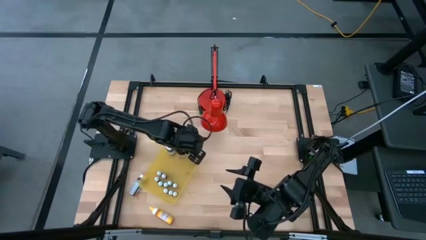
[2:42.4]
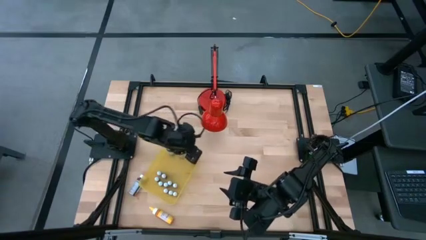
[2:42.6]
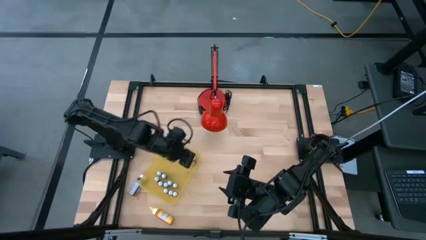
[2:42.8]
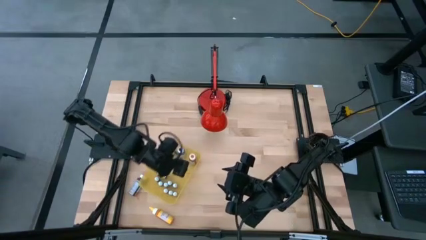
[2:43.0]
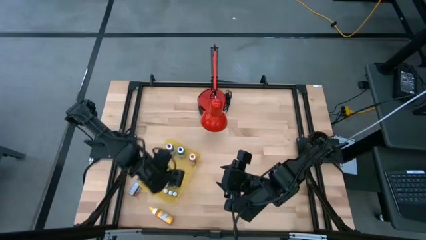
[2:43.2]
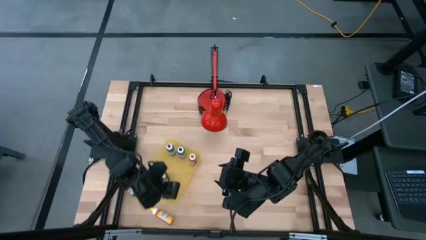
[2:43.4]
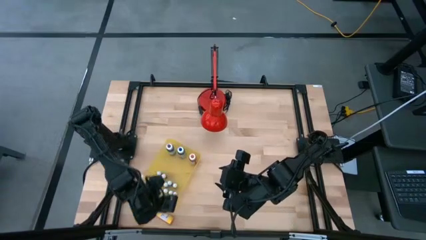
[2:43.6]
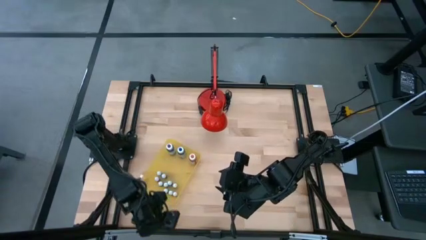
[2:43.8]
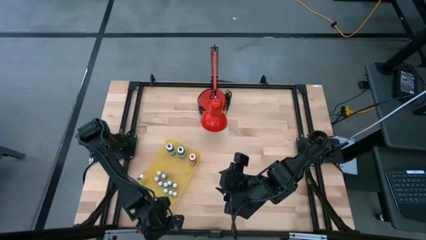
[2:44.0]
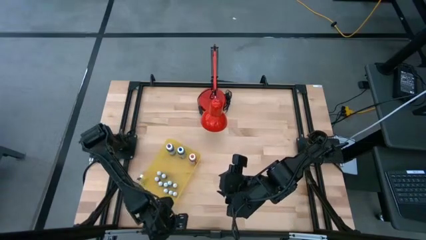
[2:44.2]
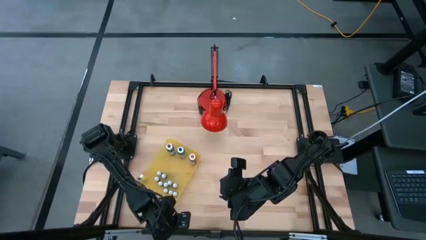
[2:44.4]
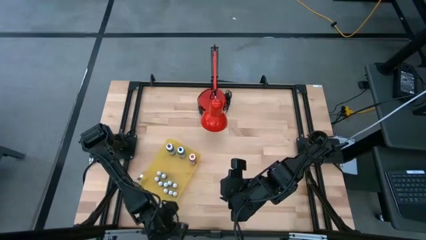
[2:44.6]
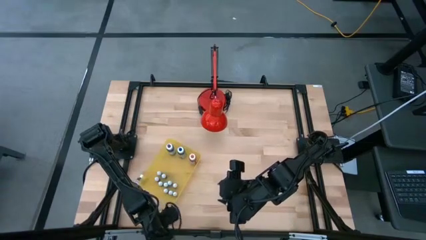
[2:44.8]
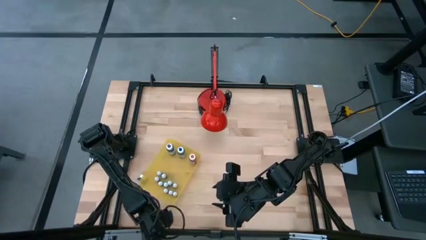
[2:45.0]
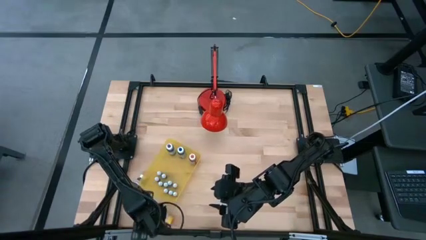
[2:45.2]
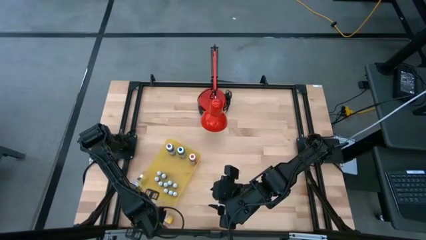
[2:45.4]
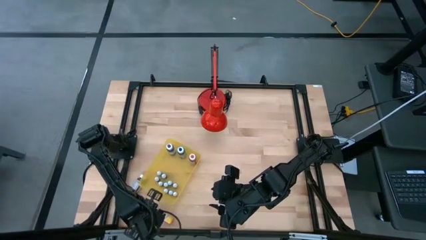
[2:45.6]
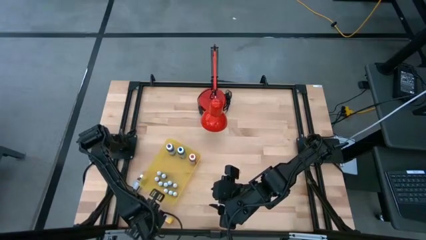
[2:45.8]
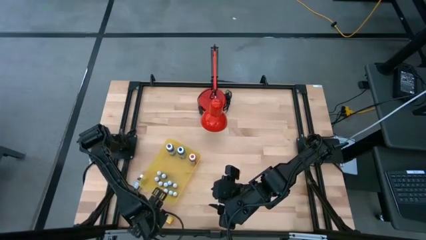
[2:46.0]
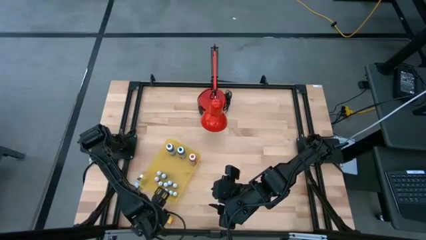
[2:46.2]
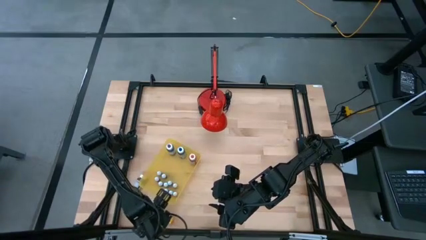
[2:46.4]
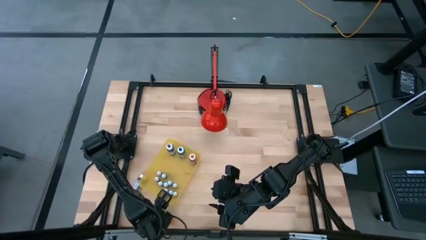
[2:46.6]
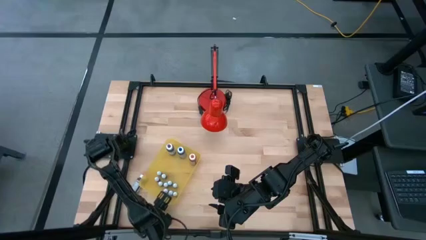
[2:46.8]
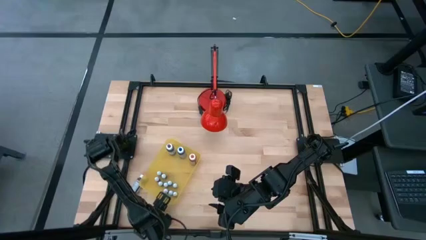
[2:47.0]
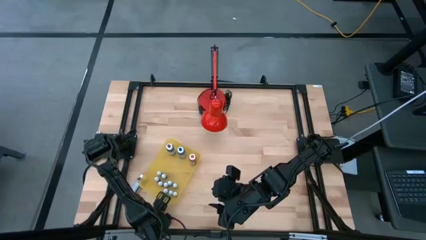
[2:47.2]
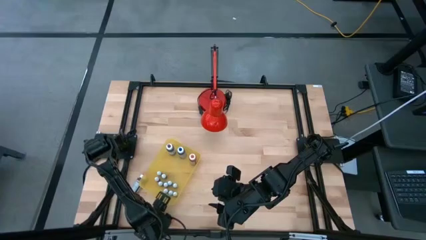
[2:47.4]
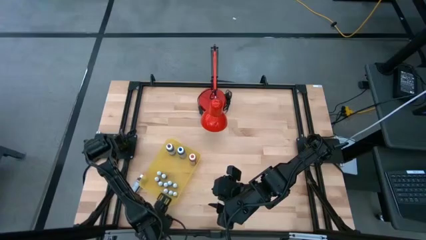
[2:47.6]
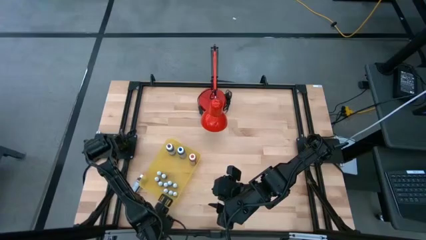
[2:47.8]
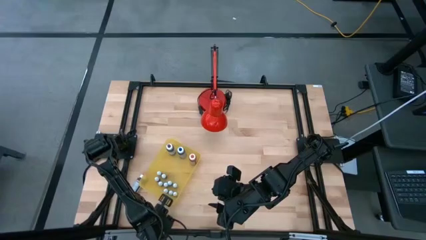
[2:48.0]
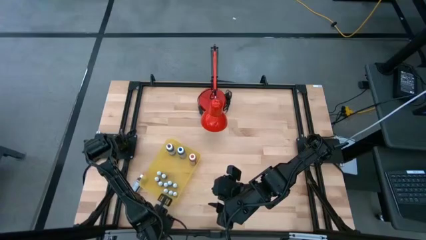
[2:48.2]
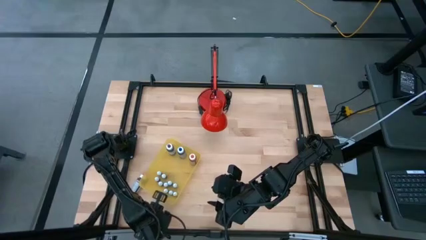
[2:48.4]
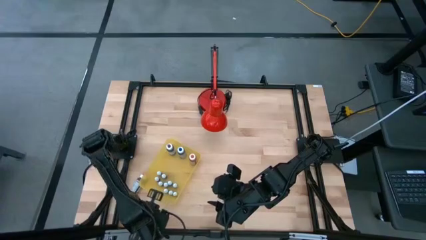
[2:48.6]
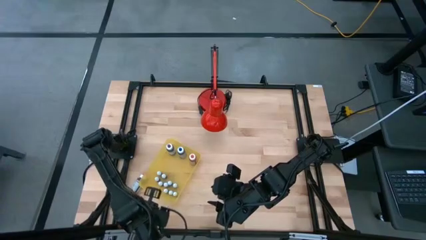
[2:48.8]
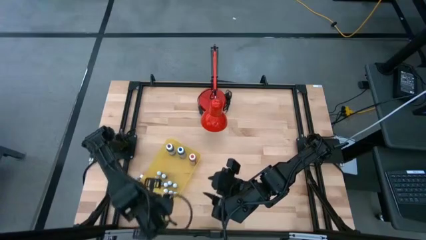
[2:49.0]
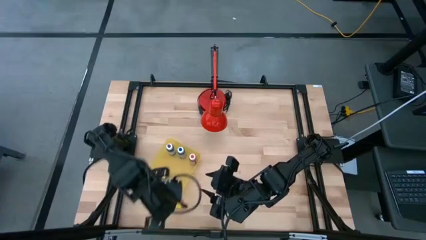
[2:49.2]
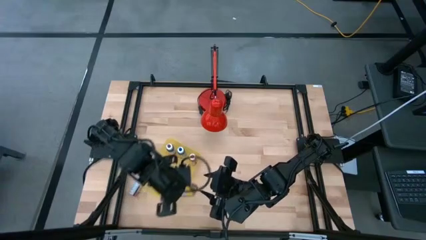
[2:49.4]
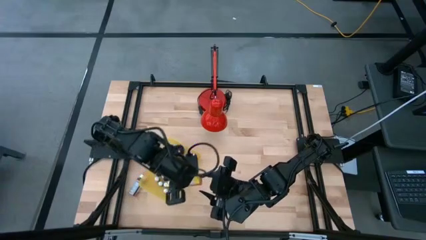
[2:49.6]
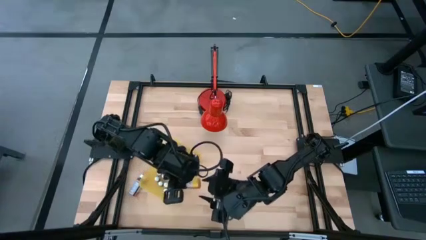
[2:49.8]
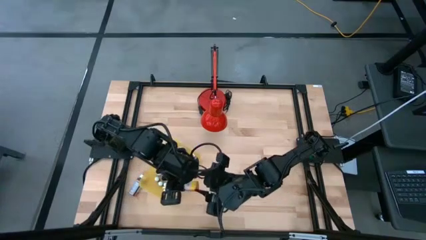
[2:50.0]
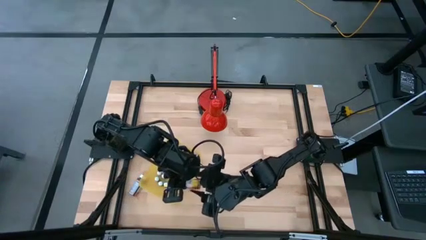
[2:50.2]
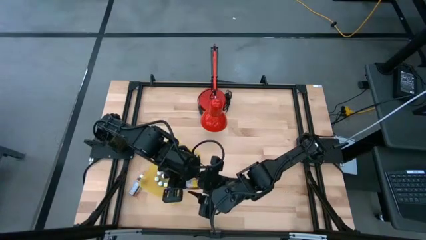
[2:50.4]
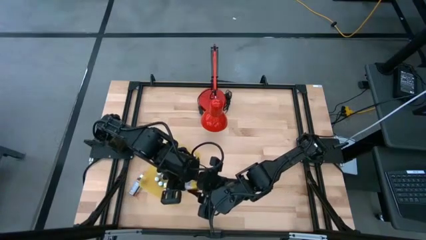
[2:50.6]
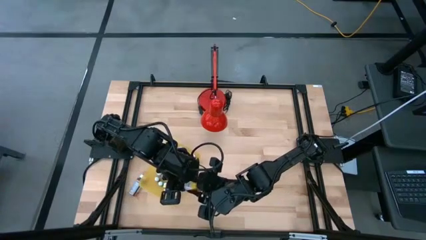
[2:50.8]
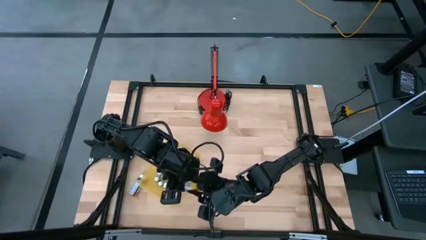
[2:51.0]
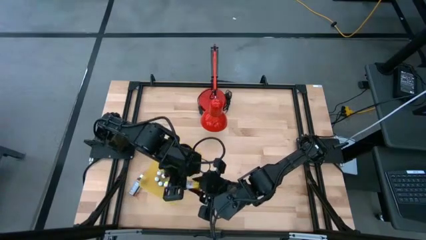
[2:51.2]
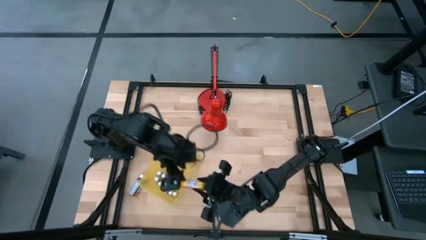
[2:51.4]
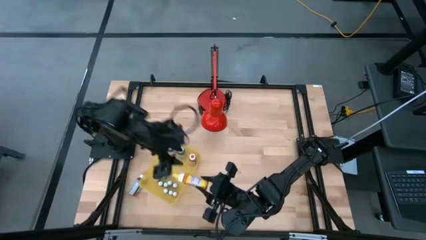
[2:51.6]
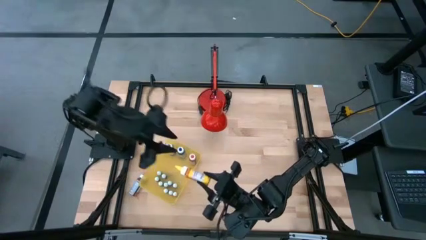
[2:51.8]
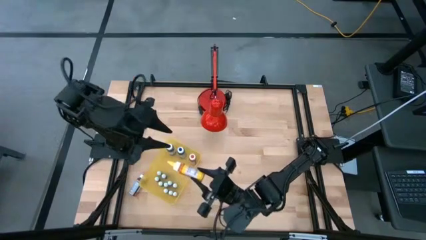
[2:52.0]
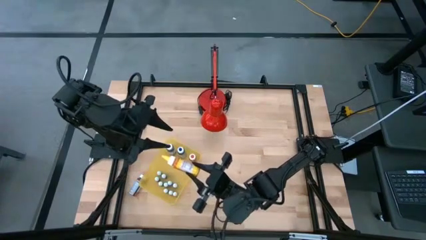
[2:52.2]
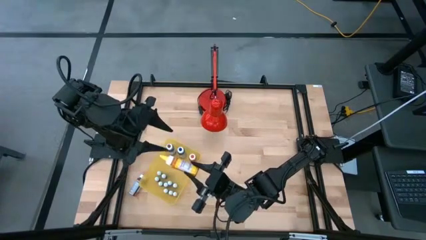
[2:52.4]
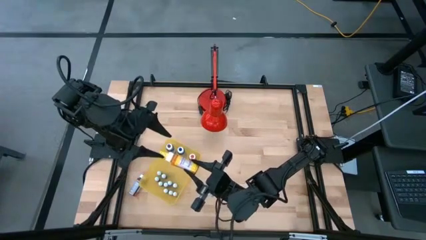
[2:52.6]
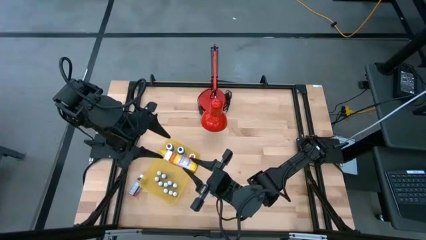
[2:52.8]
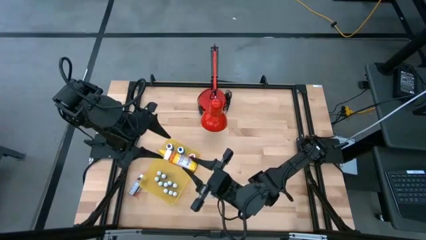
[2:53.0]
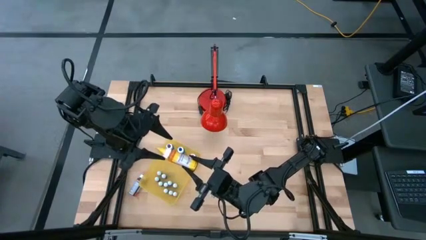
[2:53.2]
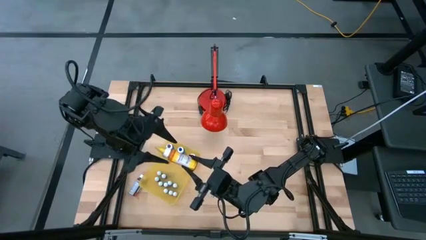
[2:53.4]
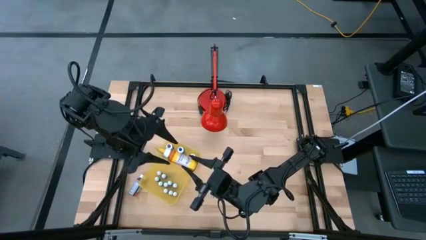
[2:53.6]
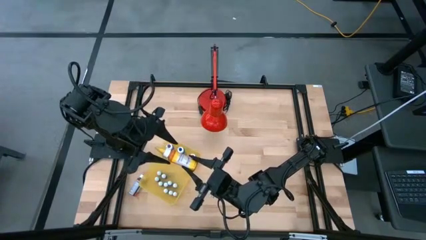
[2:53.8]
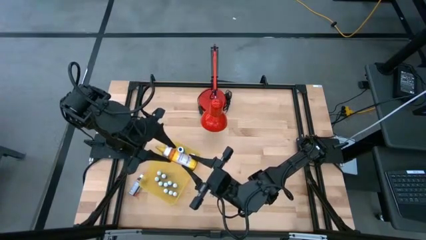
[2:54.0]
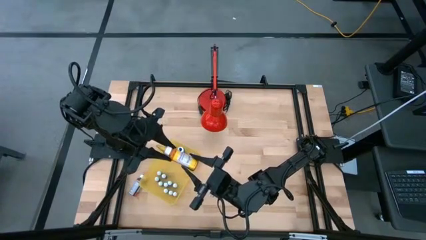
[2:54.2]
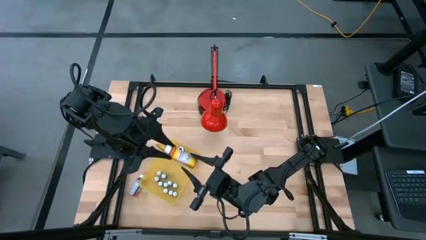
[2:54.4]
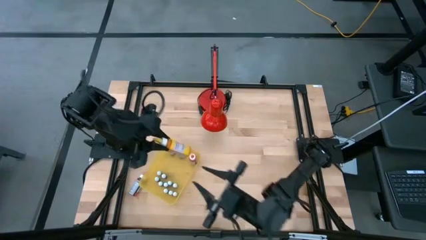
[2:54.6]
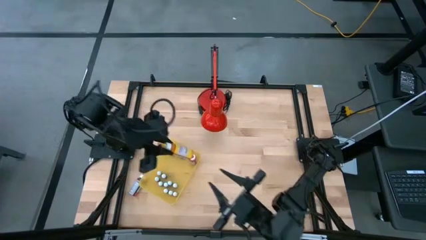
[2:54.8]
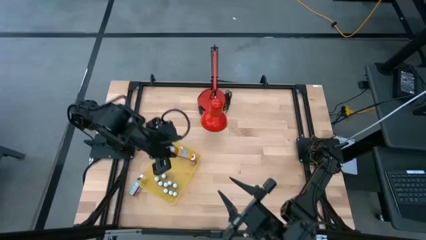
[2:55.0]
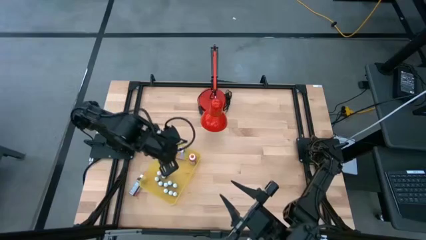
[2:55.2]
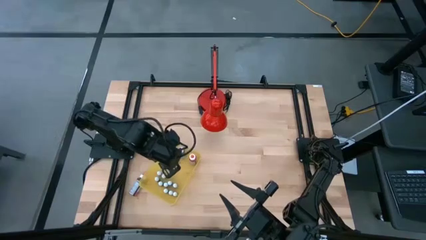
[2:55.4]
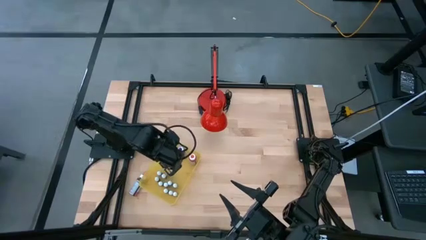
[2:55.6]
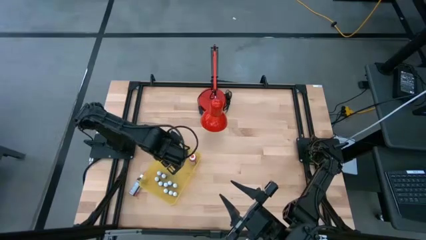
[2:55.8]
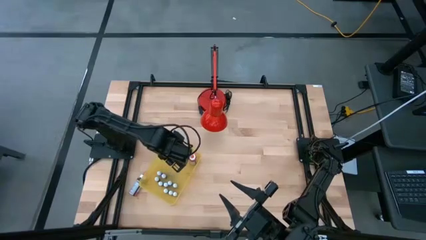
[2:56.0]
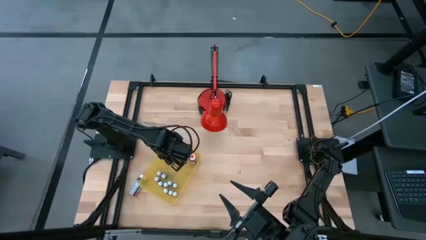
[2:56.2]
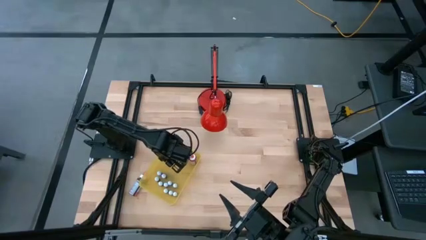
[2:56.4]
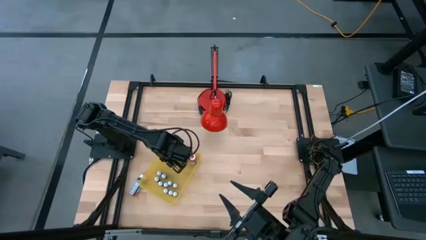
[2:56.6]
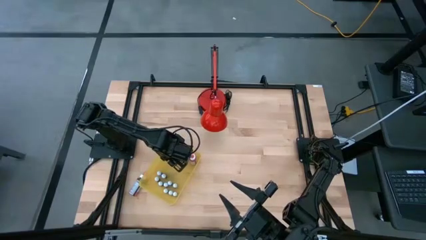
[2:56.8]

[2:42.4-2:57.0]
Task: Pick & Place food coloring
Put the large yellow food coloring bottle into the yellow bin
